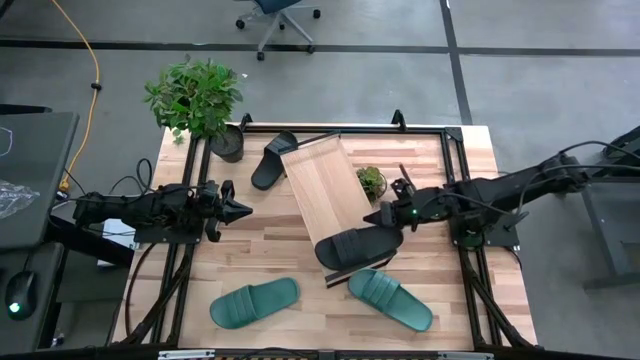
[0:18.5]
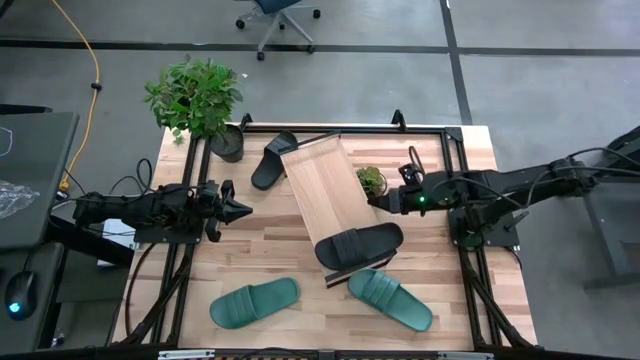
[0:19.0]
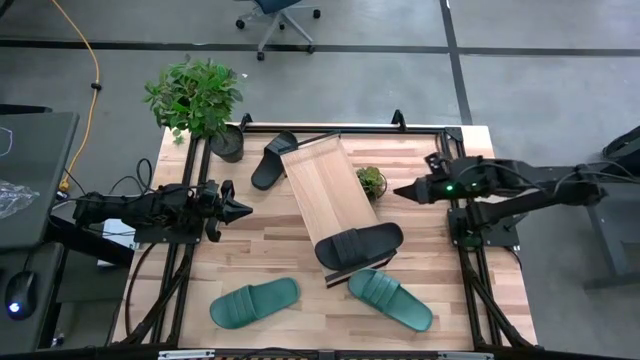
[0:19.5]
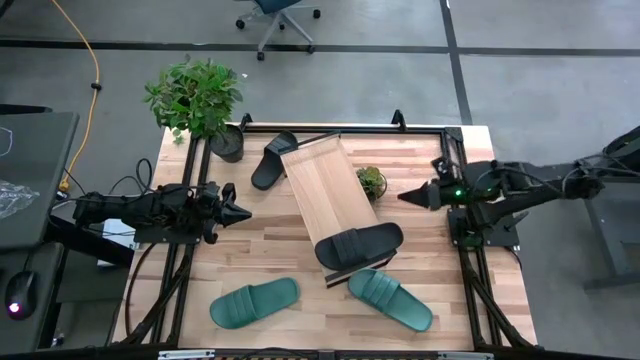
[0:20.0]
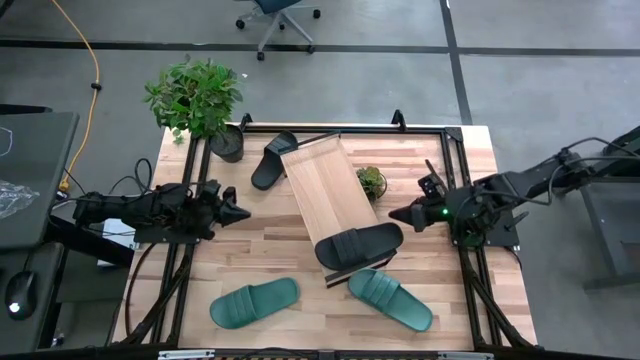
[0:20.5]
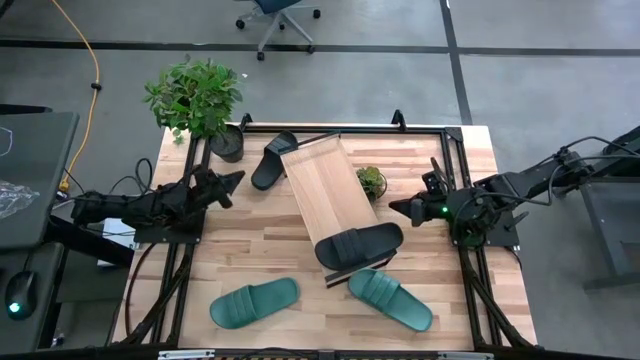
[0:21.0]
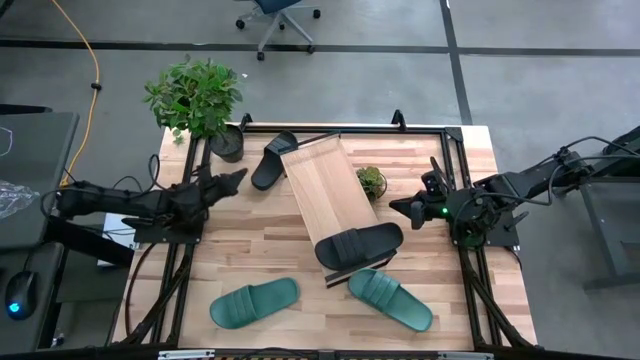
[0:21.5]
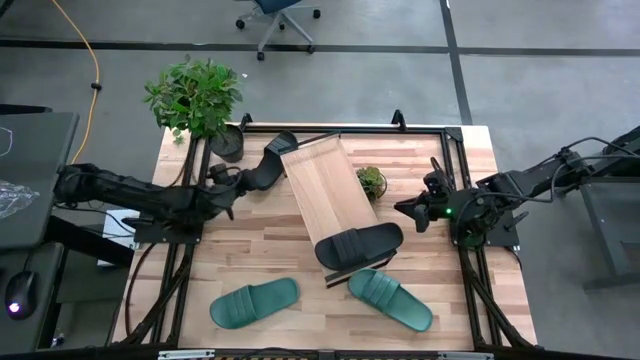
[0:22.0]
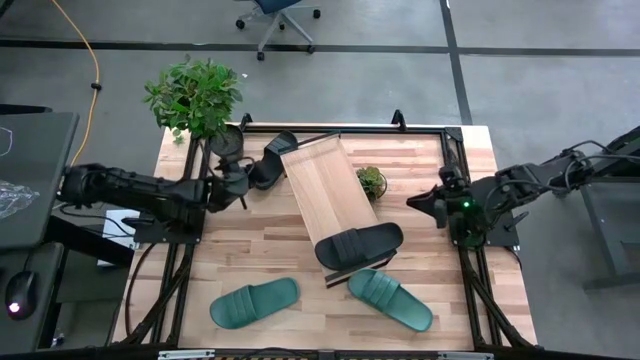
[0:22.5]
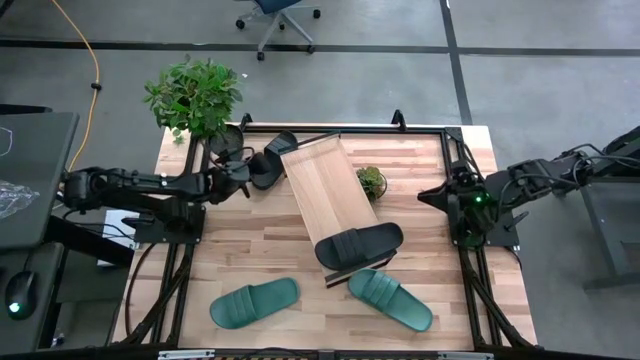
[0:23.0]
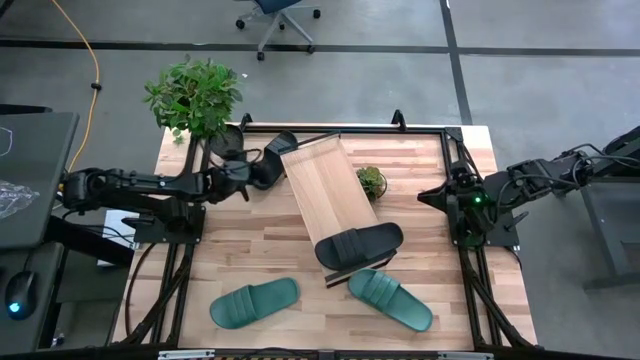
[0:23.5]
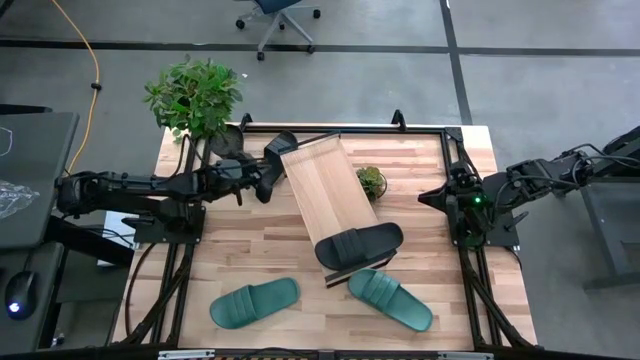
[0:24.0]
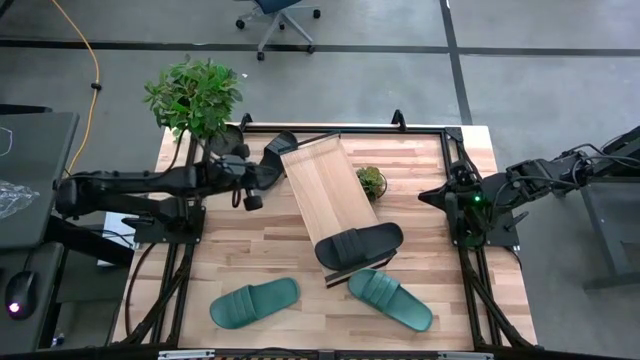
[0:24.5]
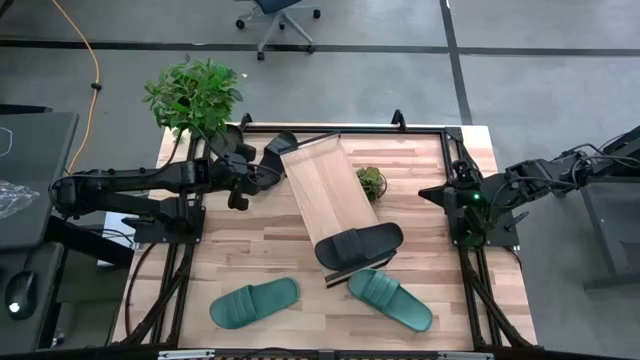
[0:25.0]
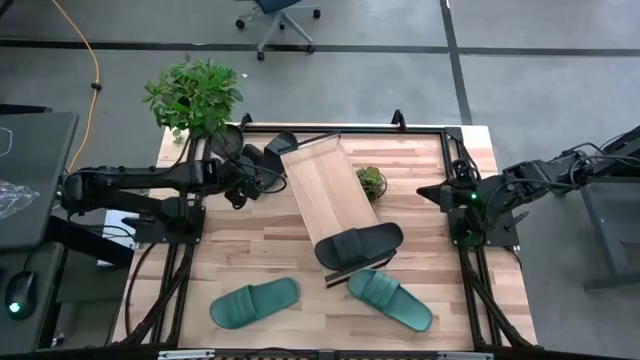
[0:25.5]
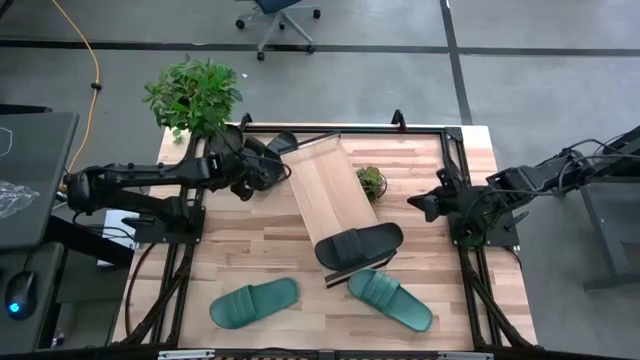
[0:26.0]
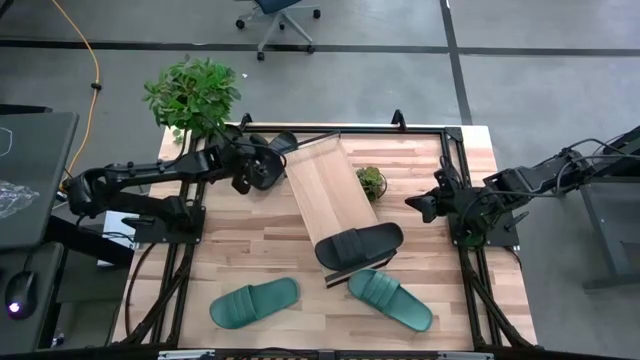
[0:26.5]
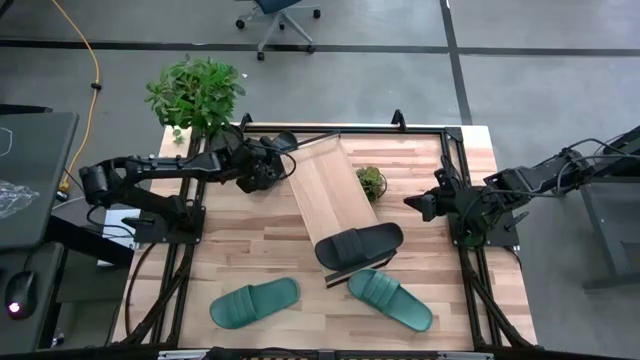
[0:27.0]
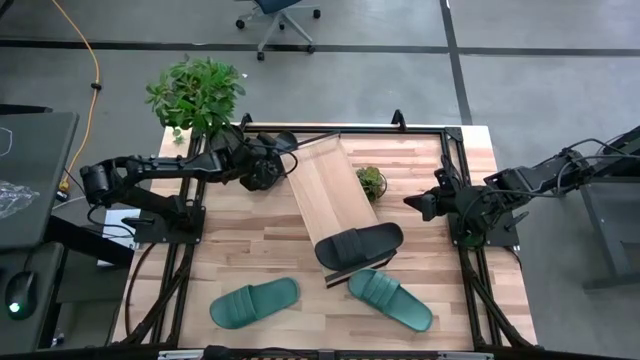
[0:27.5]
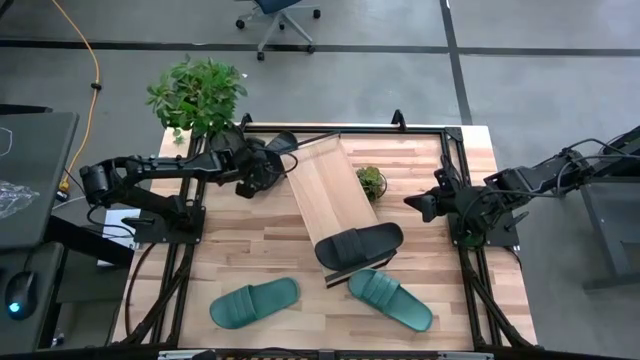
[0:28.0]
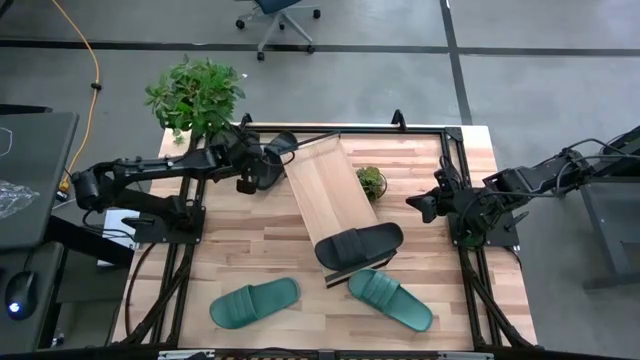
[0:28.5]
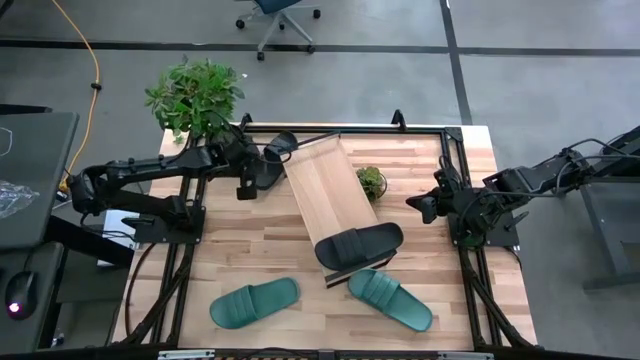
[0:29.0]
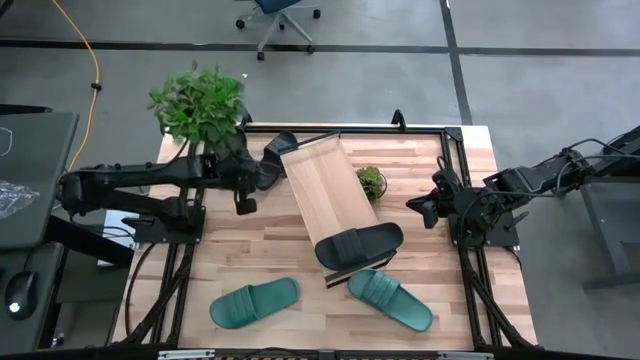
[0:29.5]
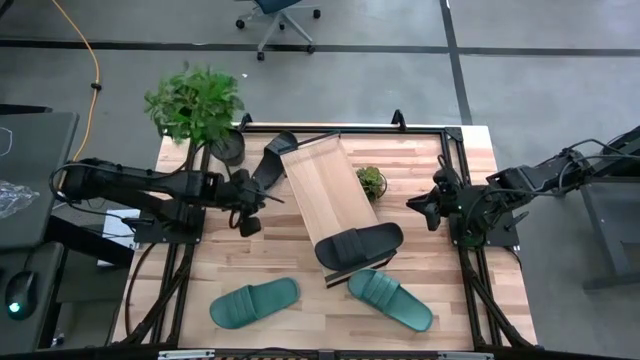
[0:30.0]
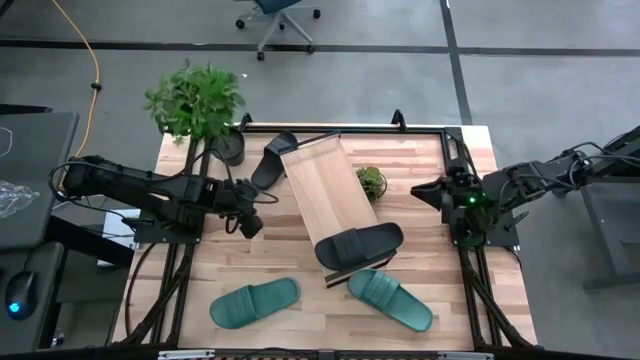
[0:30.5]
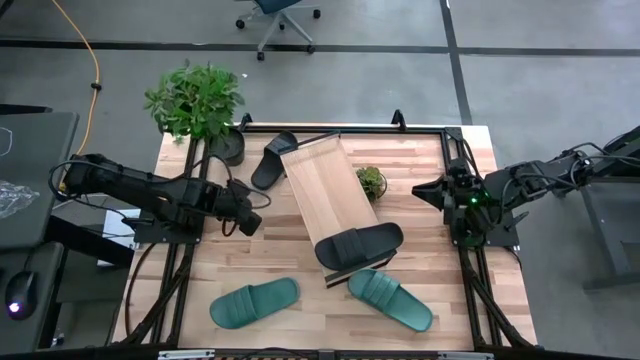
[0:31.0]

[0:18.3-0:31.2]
Task: Pick and place slides into the shelf
Adjust the black vase plant

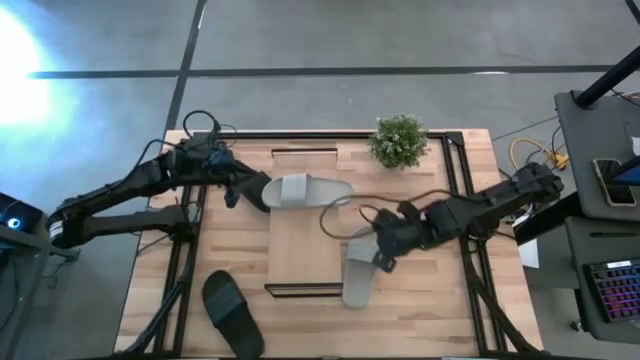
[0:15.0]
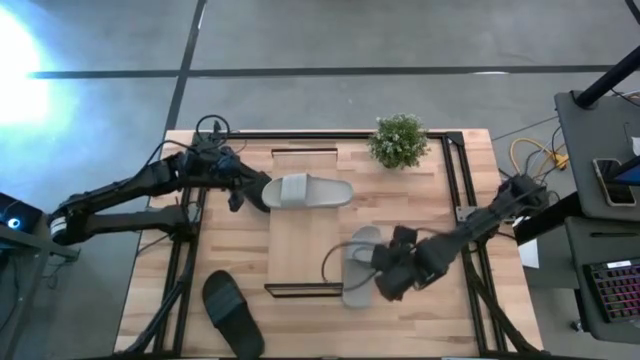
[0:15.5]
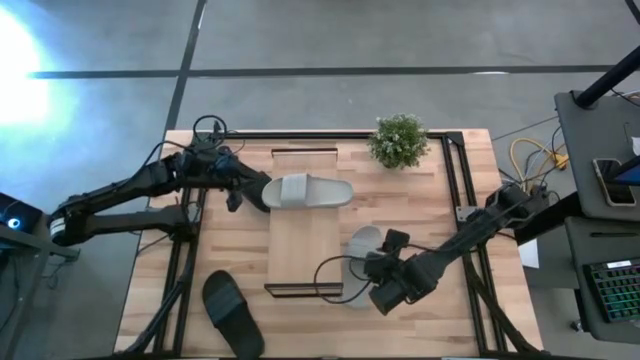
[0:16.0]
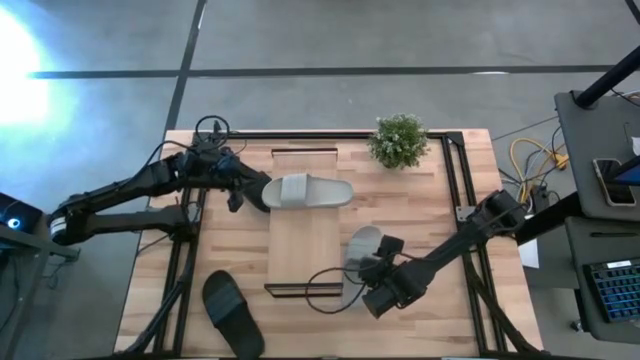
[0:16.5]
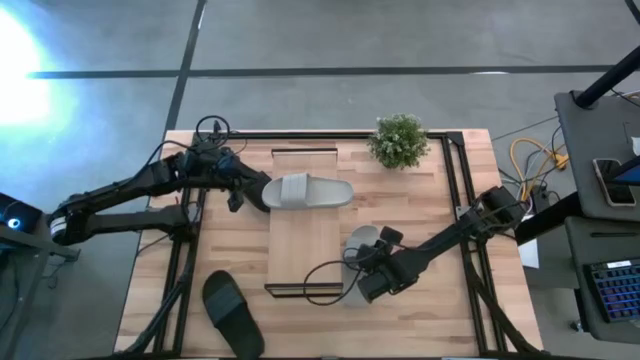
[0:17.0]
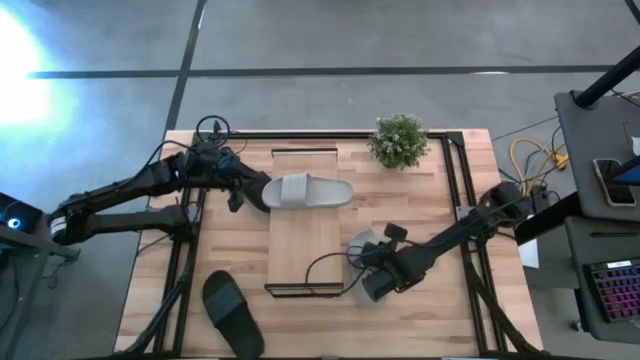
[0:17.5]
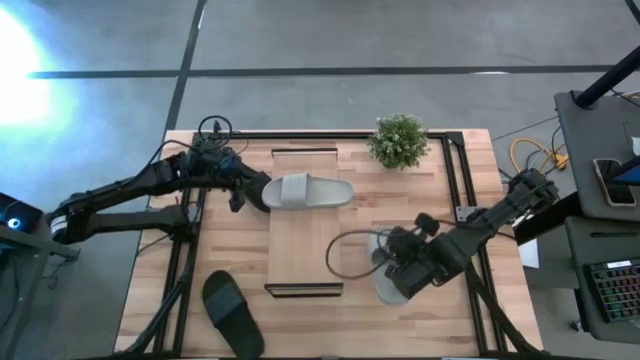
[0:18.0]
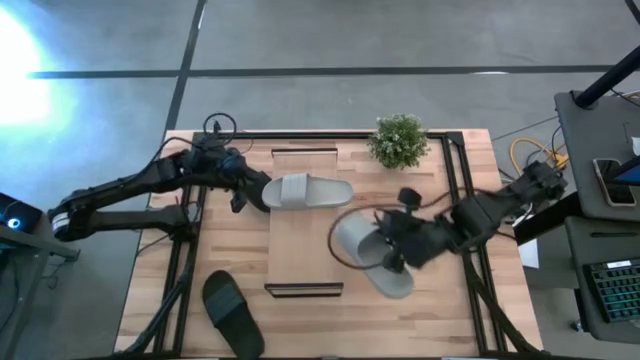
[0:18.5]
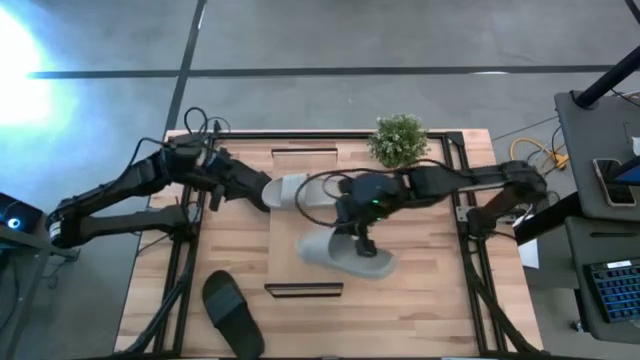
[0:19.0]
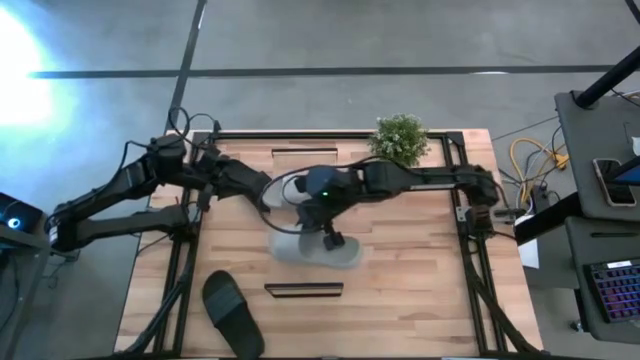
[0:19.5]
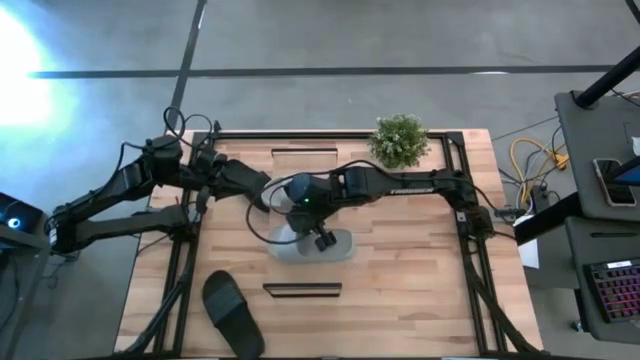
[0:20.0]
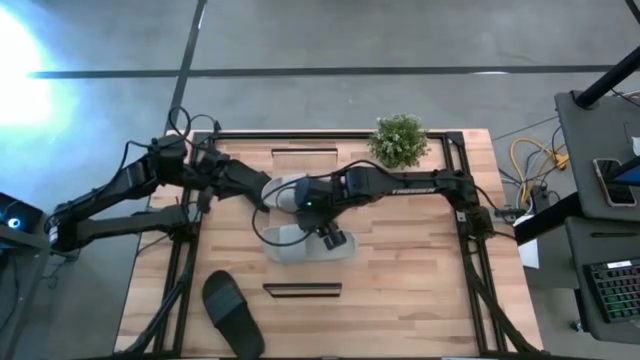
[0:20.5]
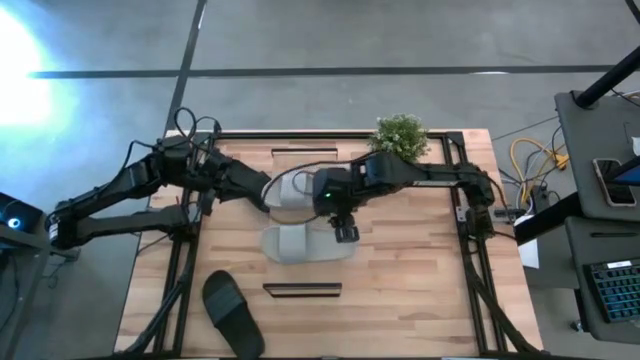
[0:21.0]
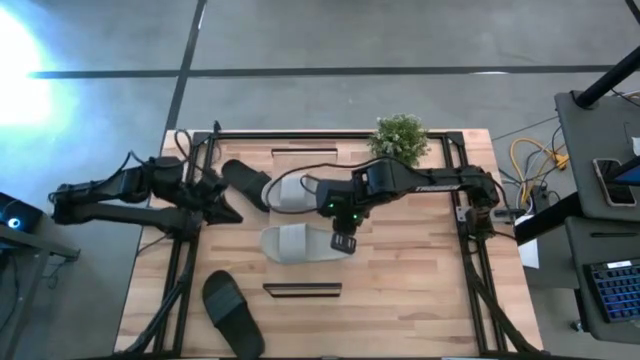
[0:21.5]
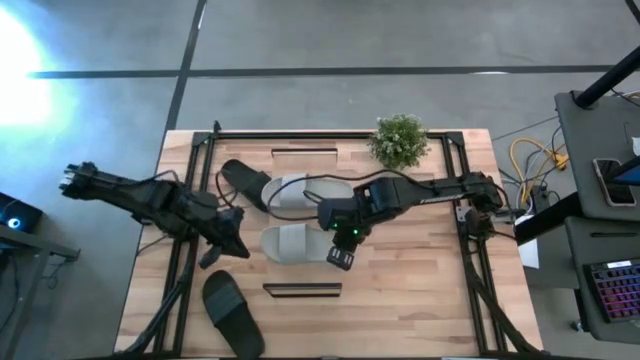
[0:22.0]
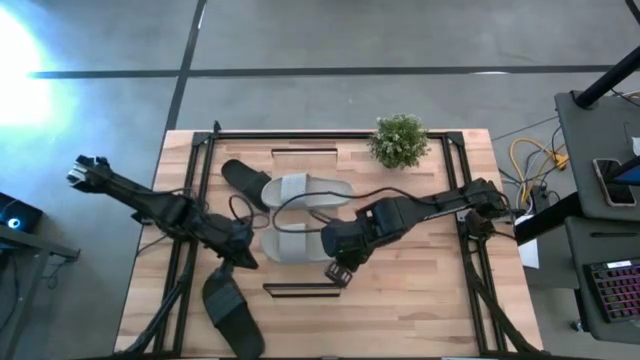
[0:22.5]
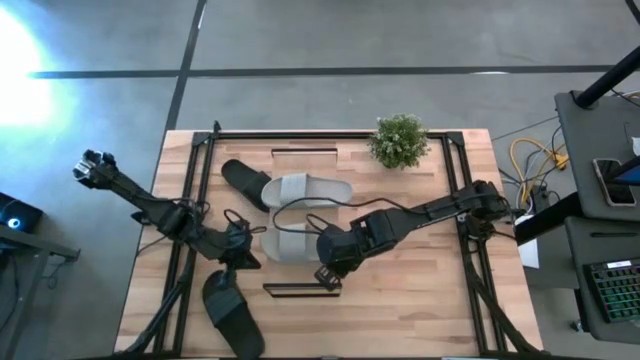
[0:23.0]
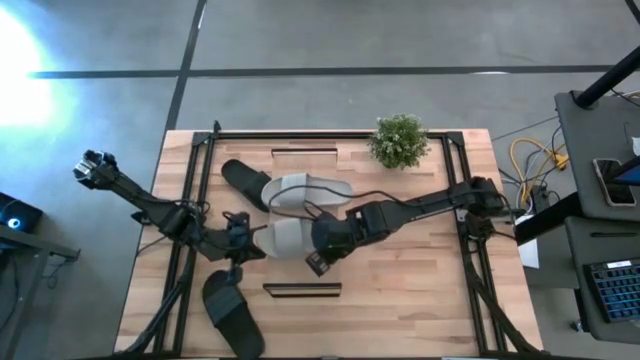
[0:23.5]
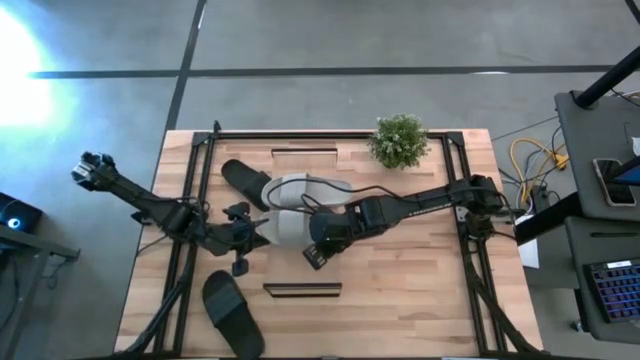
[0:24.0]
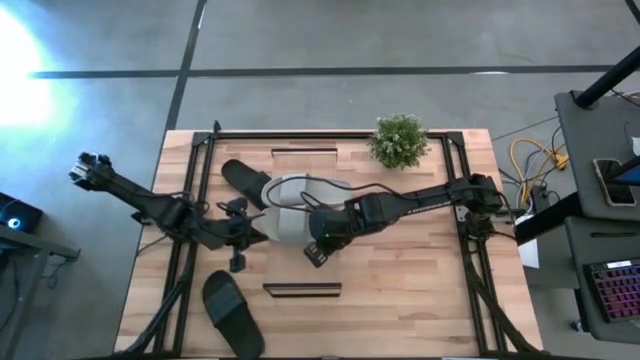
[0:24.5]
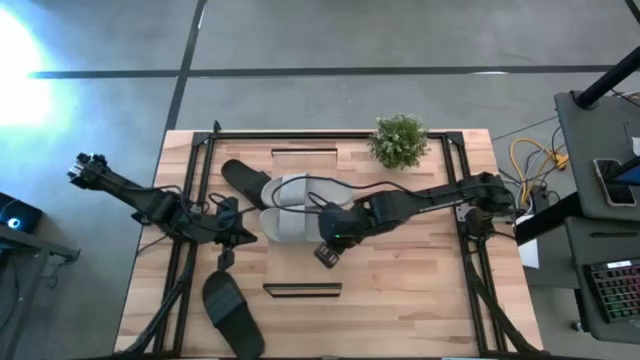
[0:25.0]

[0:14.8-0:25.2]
Task: Pick and place slides into the shelf
Put the gray slide on the shelf
